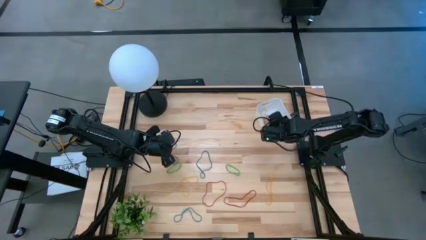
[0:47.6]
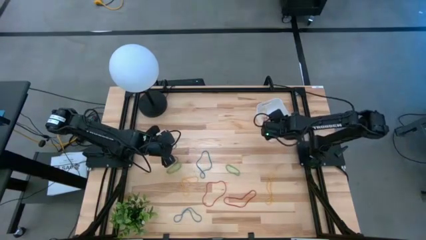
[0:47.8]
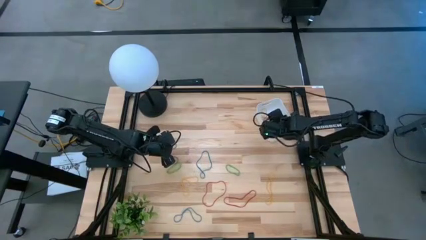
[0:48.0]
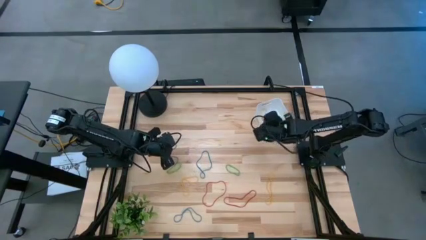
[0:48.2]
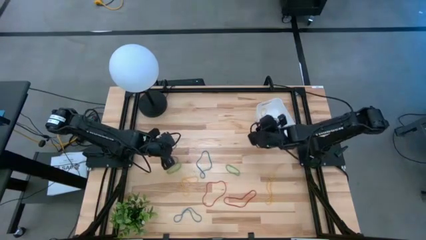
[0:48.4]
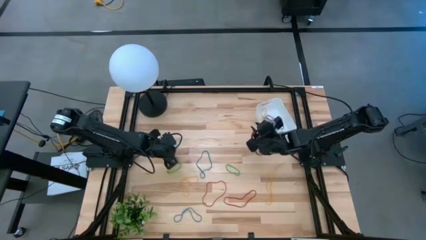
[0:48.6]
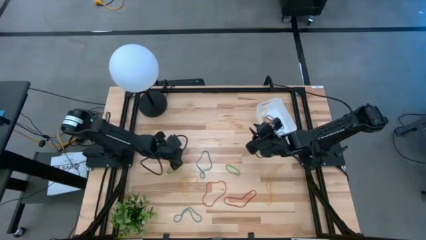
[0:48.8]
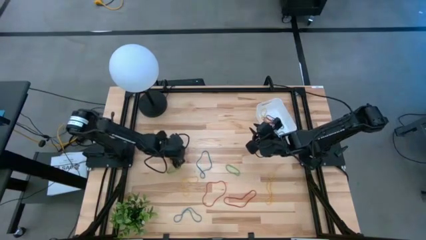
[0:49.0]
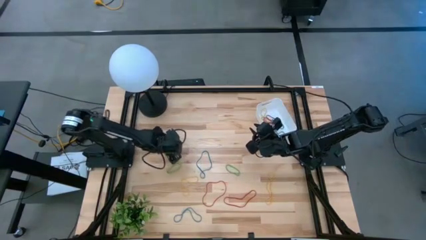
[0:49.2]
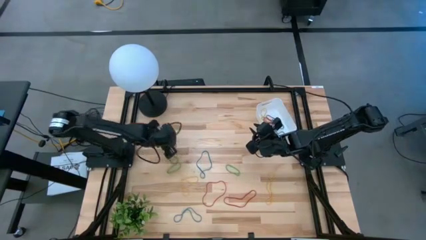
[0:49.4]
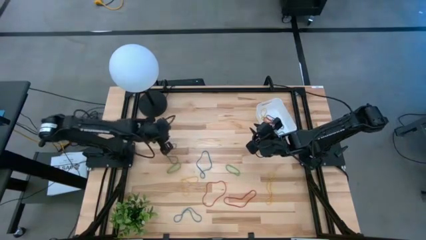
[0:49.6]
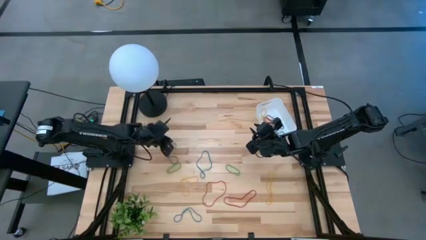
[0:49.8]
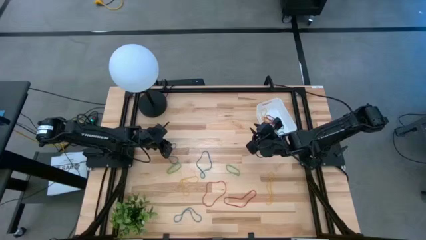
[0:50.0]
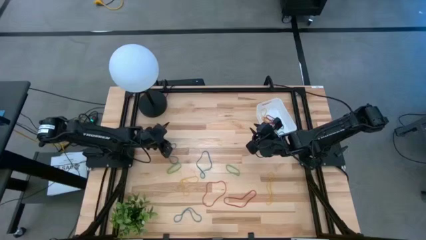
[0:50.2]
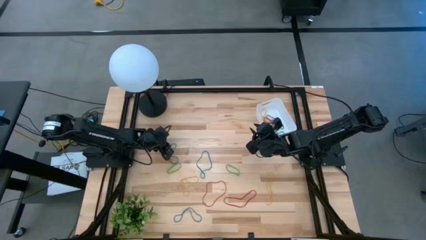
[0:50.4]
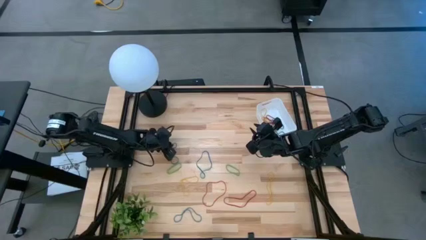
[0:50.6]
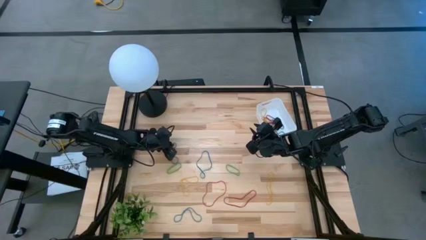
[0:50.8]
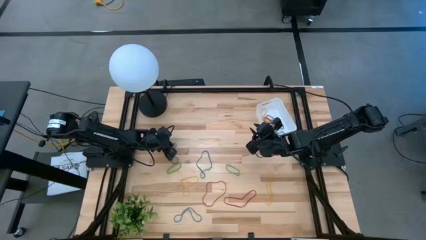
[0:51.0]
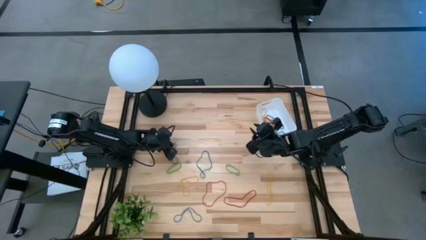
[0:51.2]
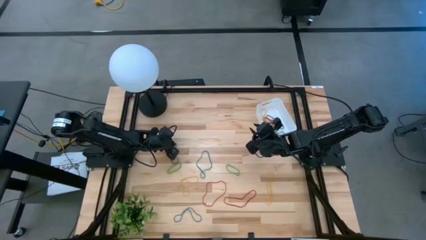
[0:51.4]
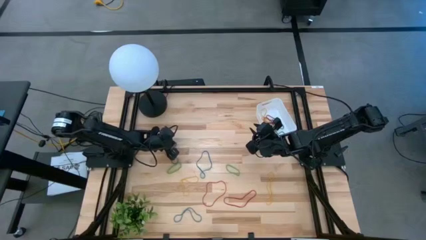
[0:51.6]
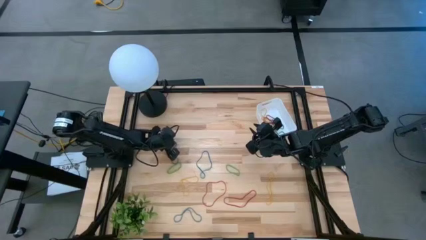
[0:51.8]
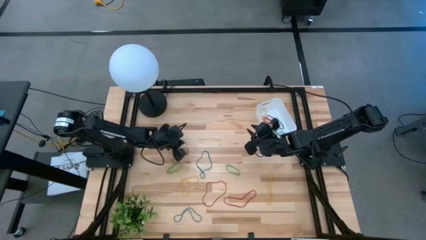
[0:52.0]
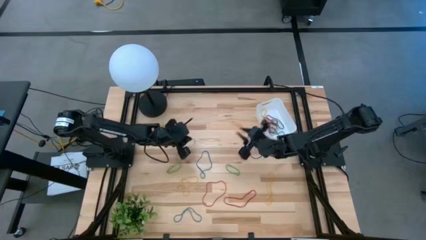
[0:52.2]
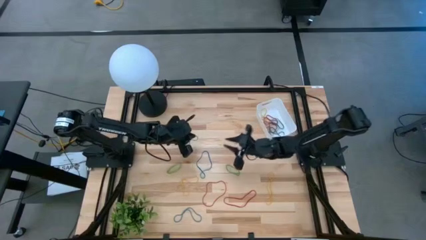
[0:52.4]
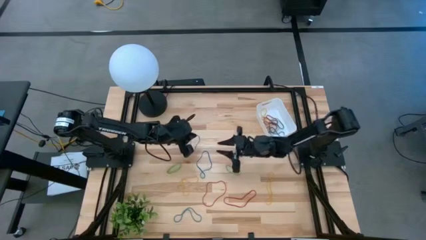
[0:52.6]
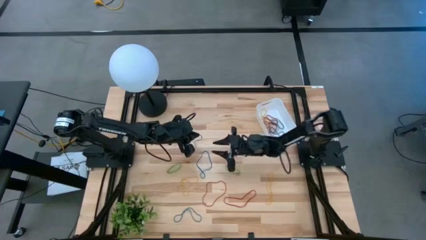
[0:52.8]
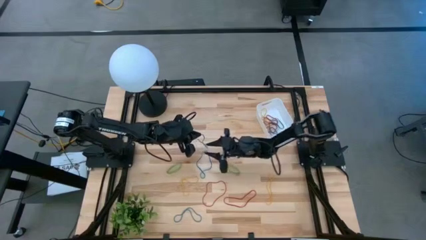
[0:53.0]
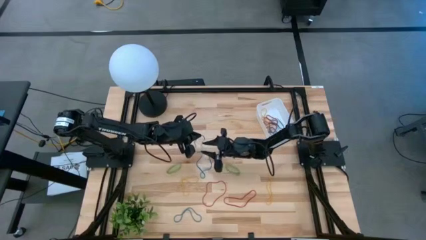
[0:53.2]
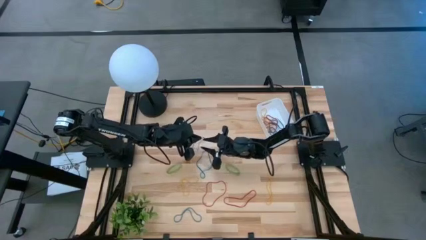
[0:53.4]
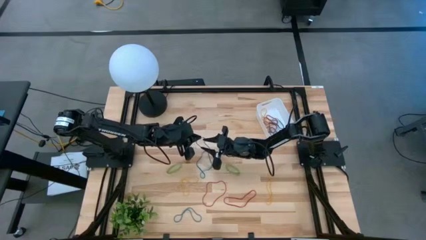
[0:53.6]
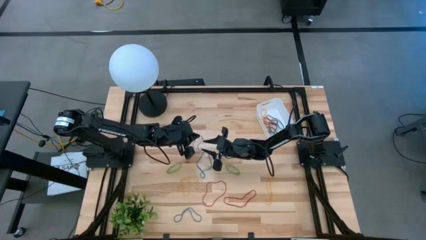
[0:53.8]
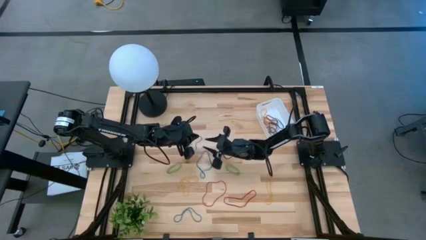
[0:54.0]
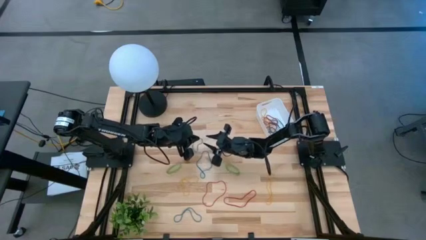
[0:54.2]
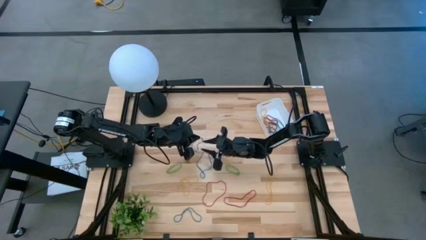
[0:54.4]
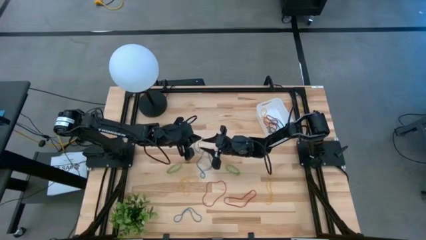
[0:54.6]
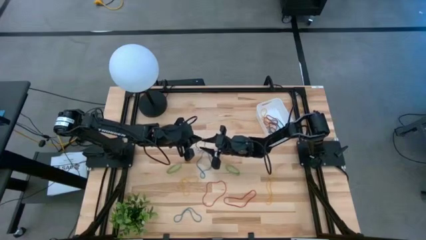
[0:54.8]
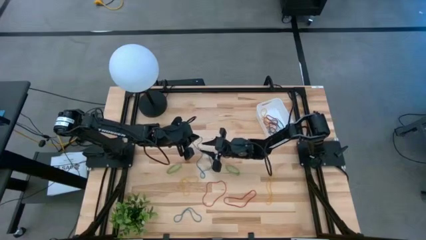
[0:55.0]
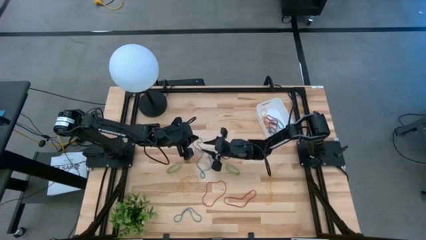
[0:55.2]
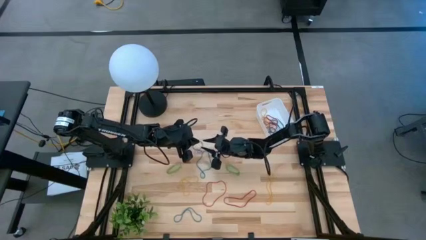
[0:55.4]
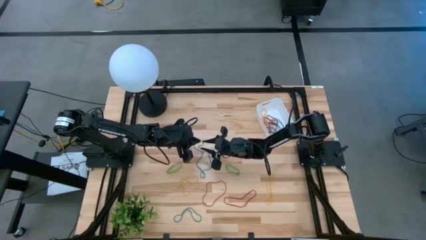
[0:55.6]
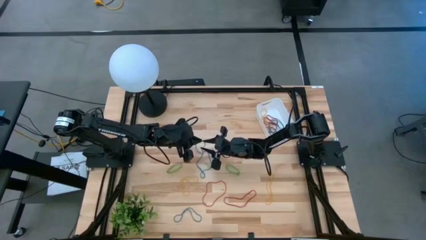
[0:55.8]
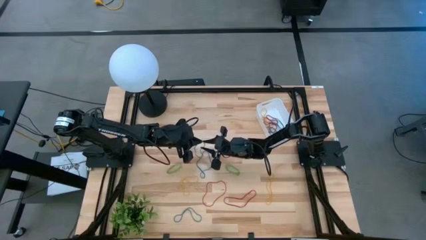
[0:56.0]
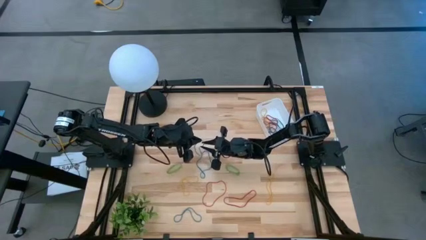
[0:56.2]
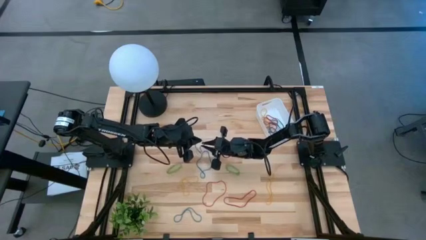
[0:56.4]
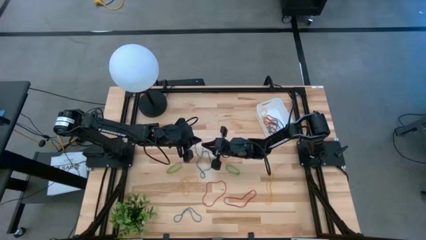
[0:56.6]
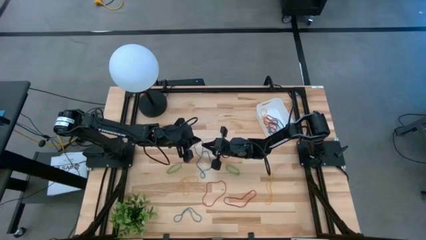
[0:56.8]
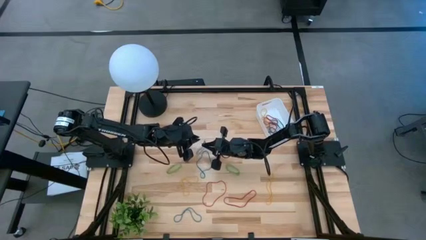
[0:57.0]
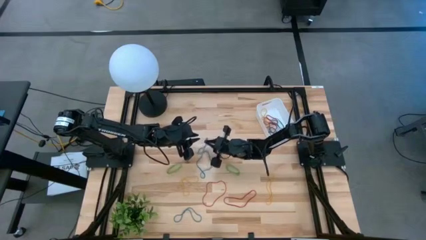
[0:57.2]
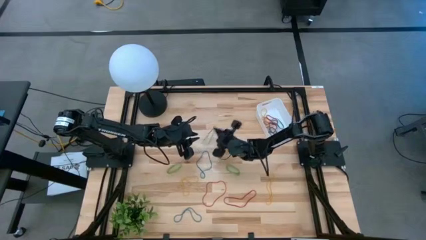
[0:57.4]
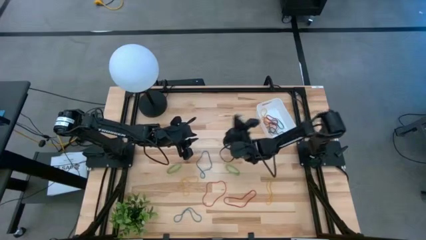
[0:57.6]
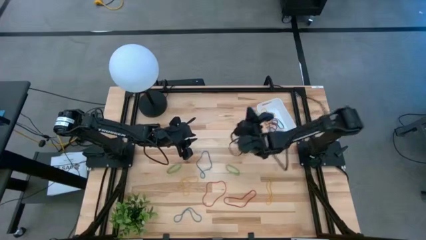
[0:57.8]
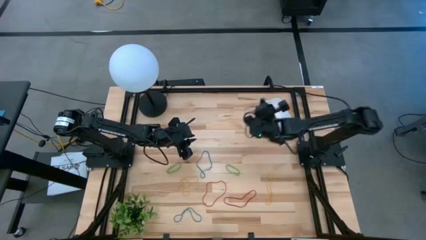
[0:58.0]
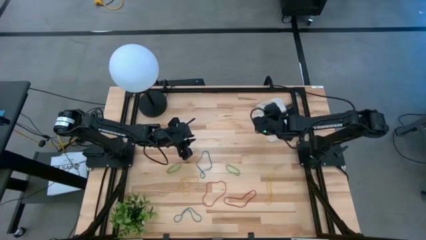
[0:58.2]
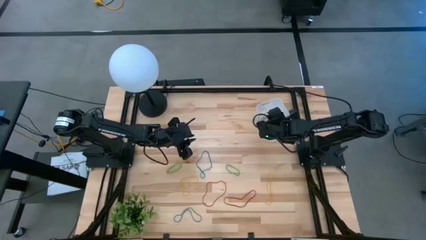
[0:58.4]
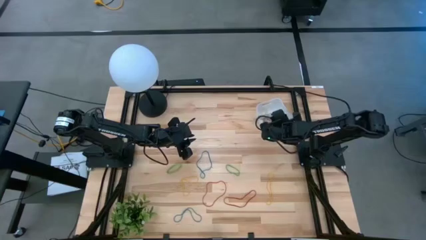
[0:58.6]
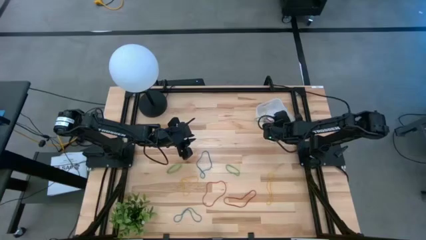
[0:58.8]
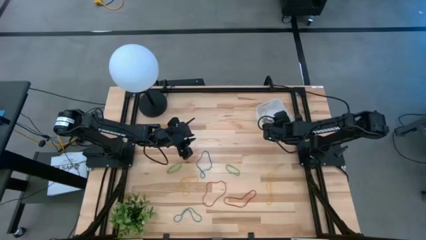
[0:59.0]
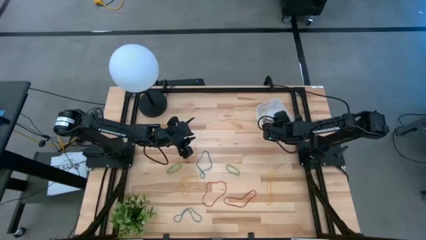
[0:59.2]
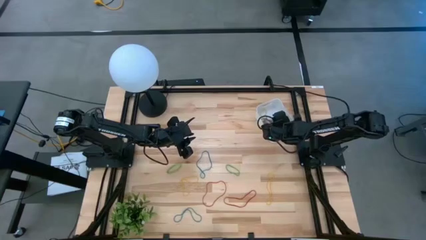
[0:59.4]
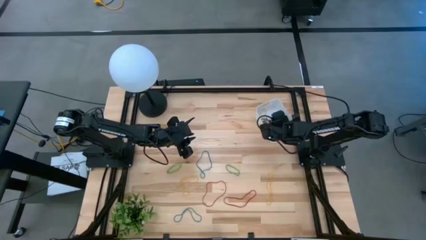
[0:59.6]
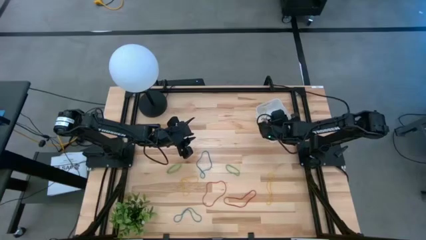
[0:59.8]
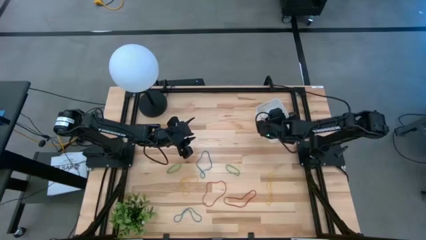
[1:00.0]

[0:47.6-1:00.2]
Task: Pick and place items into bin
Put the left blue rubber band into the white bin
